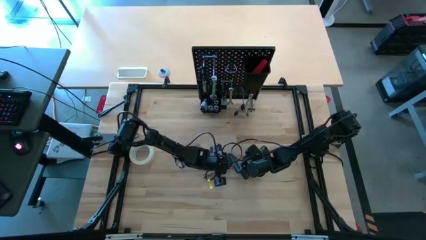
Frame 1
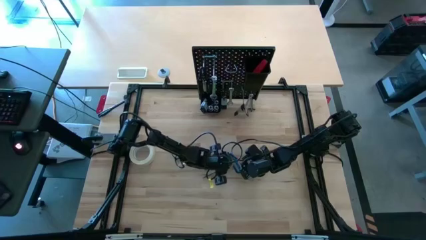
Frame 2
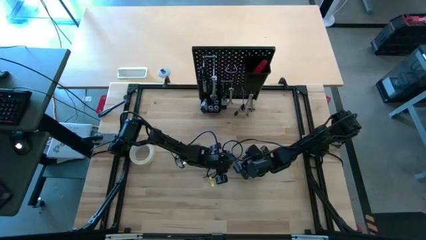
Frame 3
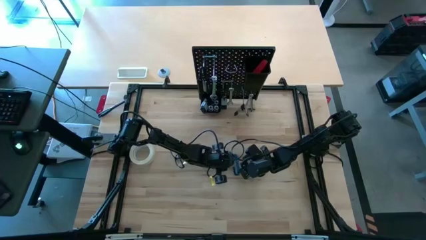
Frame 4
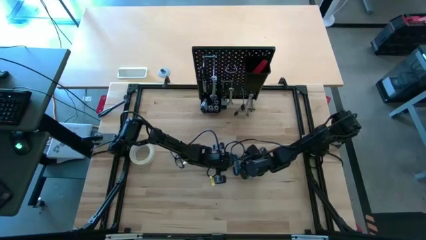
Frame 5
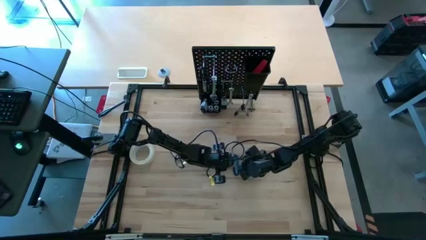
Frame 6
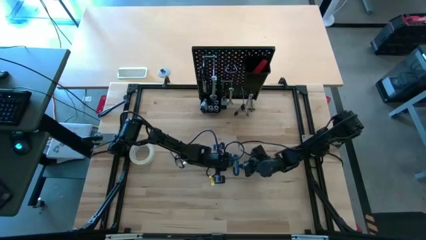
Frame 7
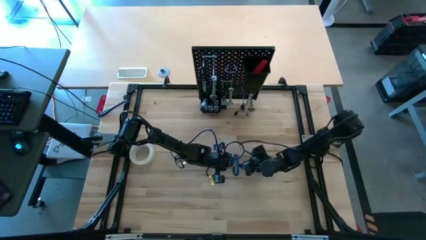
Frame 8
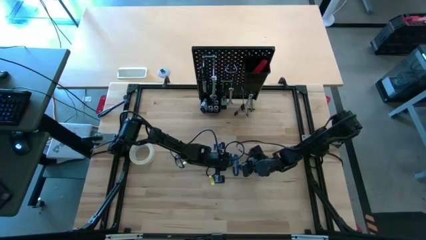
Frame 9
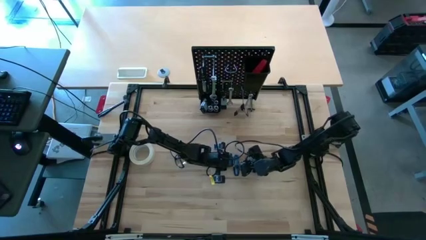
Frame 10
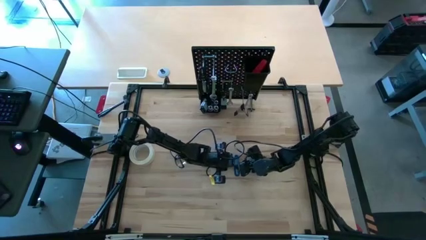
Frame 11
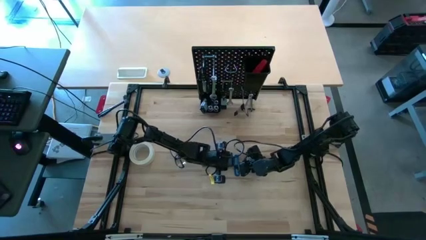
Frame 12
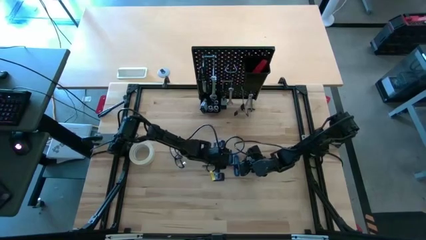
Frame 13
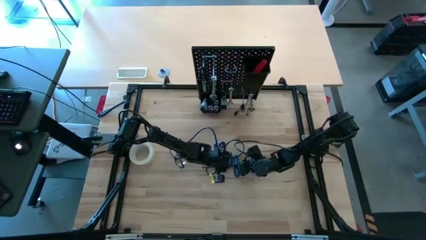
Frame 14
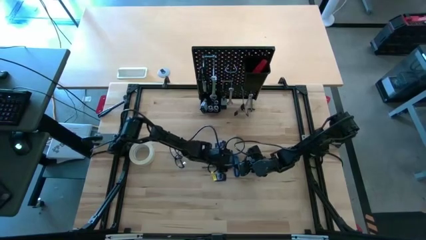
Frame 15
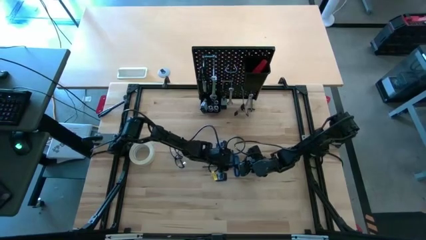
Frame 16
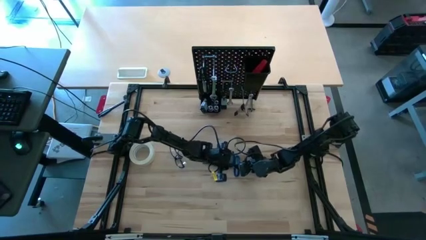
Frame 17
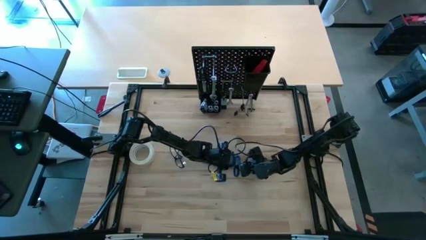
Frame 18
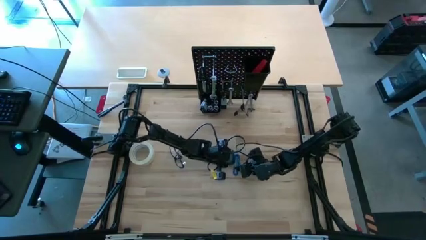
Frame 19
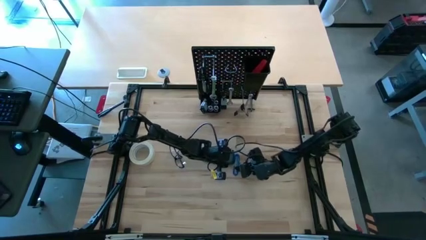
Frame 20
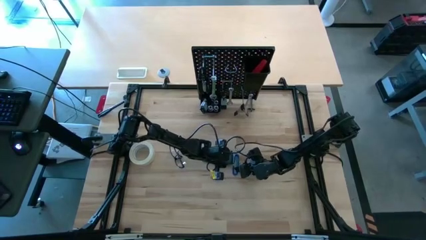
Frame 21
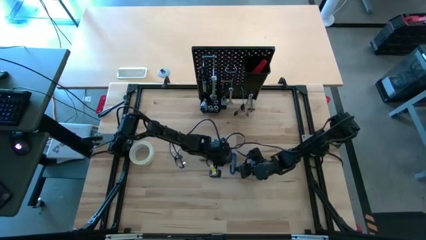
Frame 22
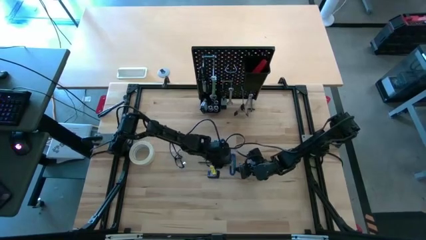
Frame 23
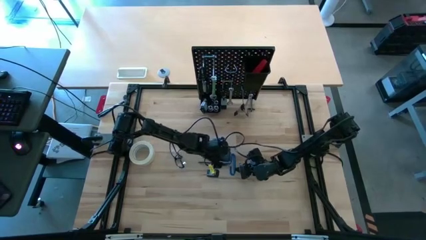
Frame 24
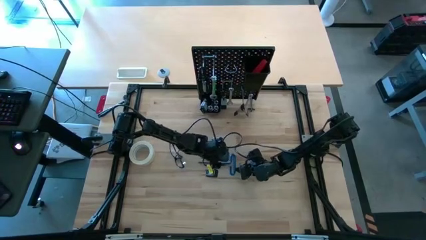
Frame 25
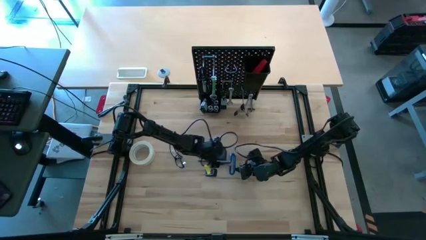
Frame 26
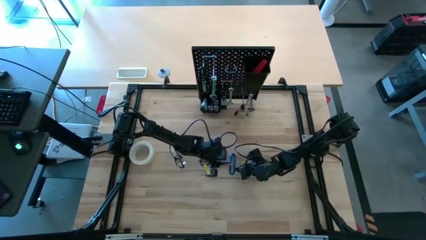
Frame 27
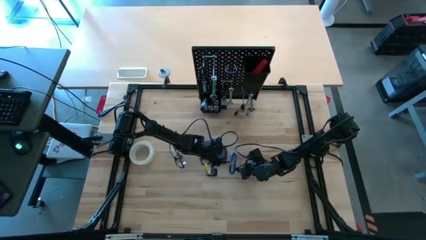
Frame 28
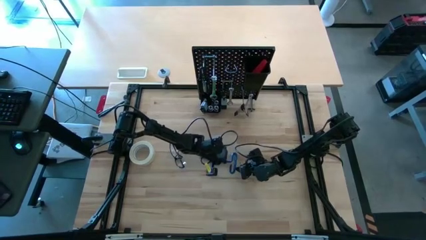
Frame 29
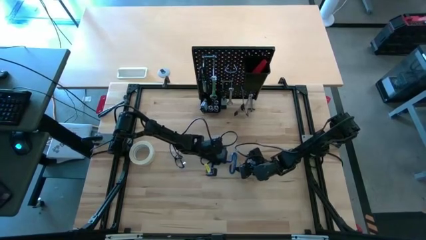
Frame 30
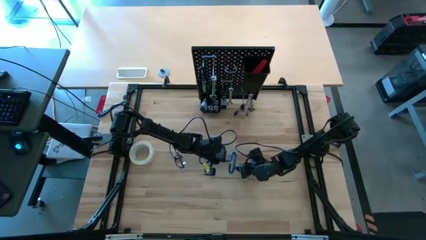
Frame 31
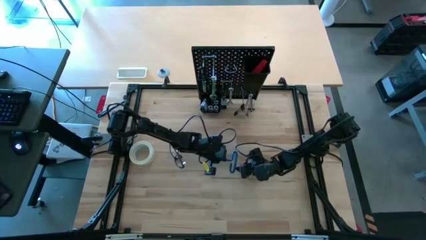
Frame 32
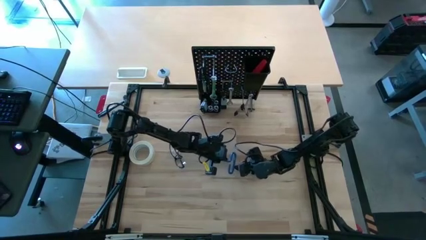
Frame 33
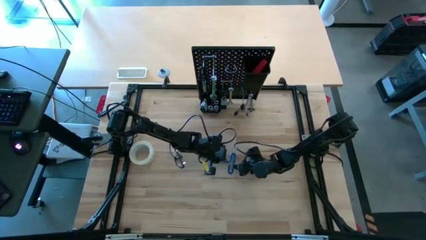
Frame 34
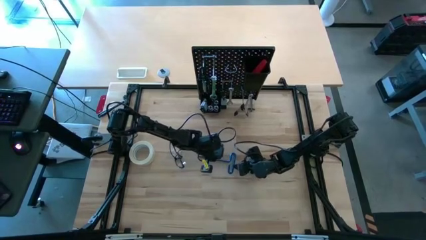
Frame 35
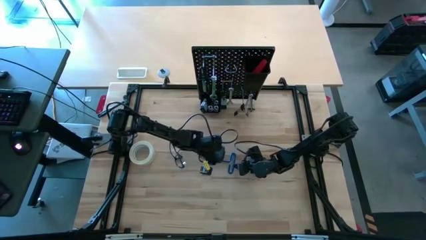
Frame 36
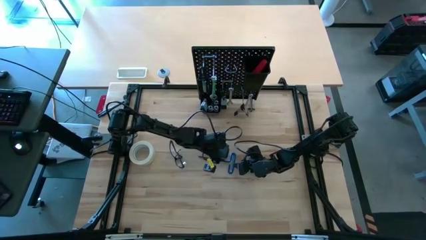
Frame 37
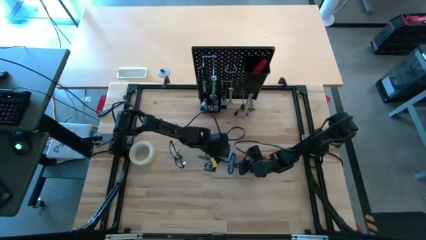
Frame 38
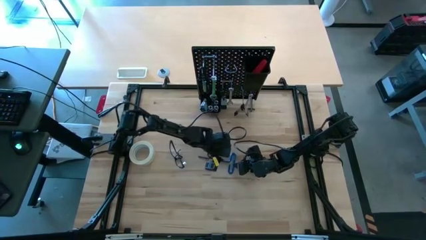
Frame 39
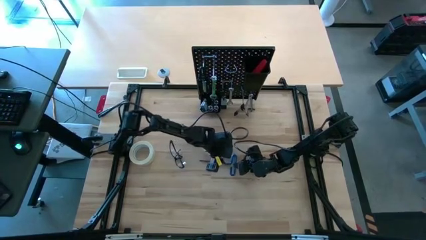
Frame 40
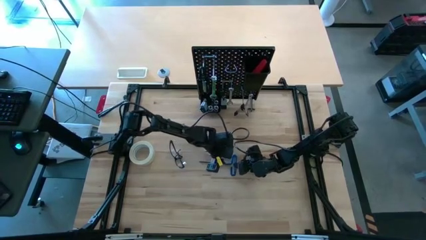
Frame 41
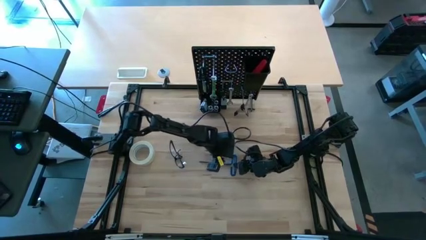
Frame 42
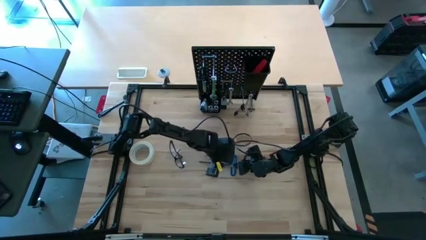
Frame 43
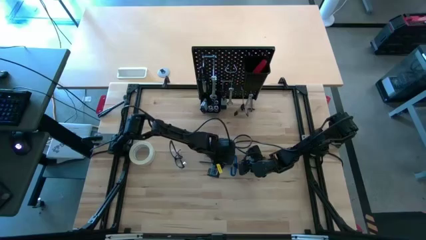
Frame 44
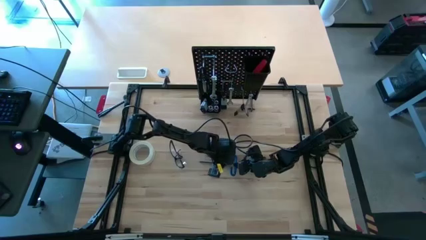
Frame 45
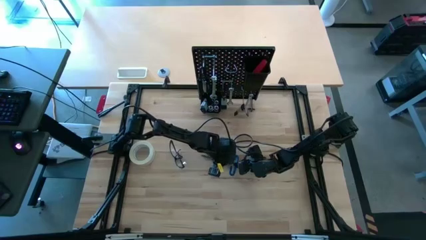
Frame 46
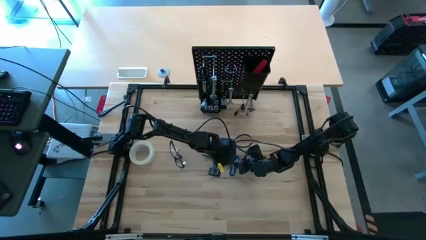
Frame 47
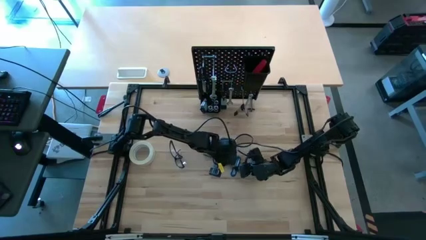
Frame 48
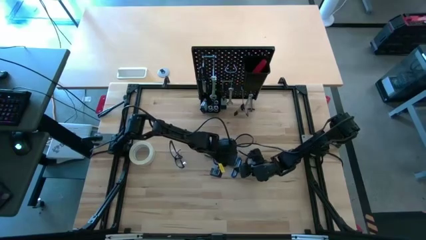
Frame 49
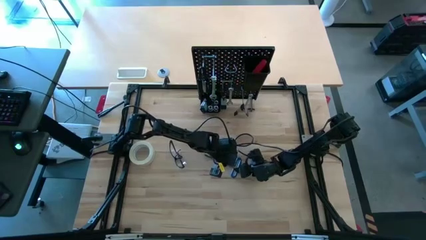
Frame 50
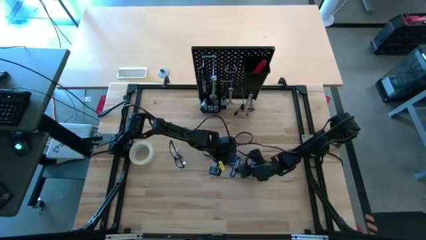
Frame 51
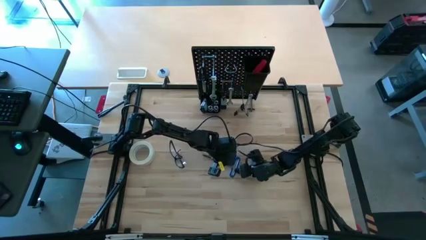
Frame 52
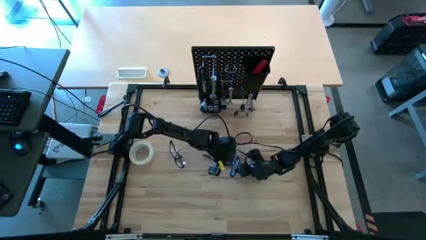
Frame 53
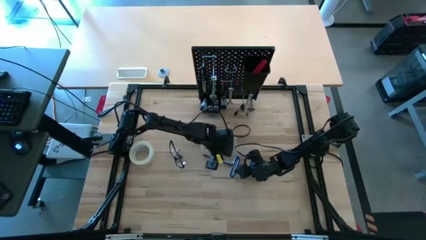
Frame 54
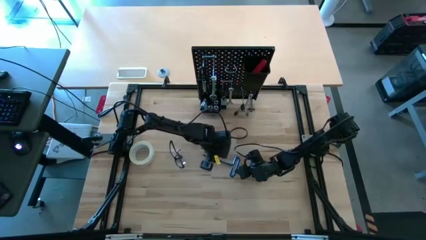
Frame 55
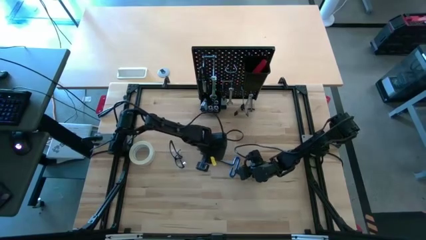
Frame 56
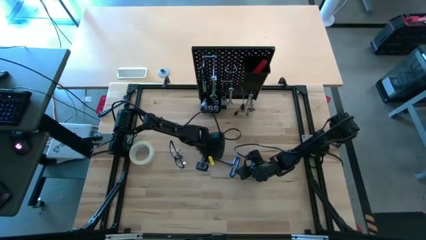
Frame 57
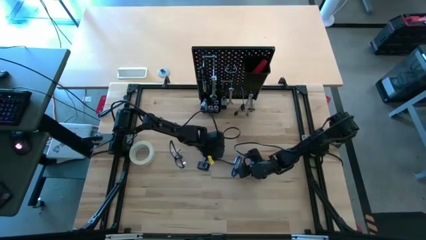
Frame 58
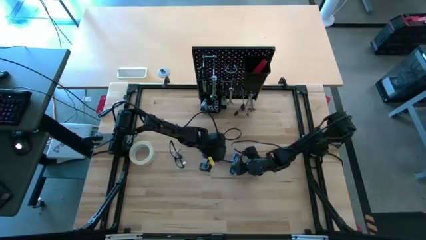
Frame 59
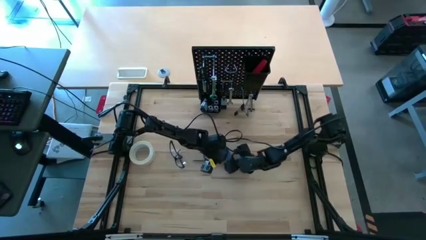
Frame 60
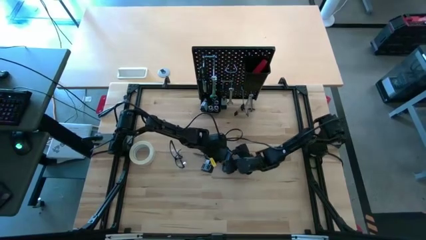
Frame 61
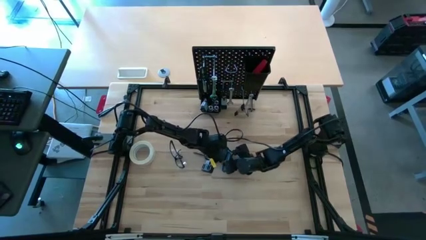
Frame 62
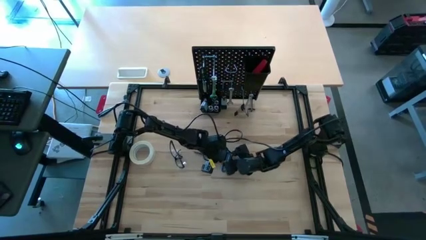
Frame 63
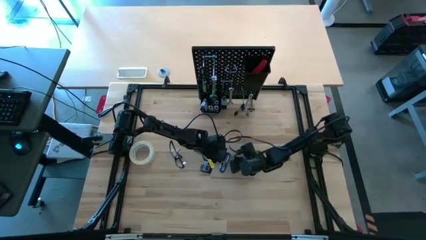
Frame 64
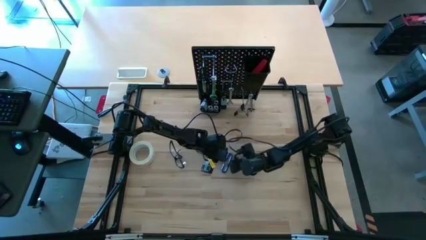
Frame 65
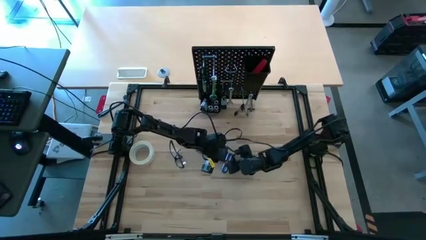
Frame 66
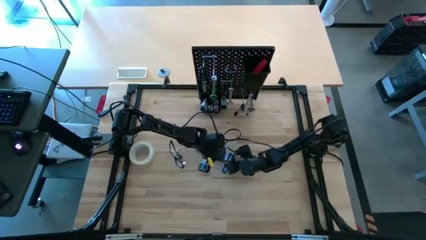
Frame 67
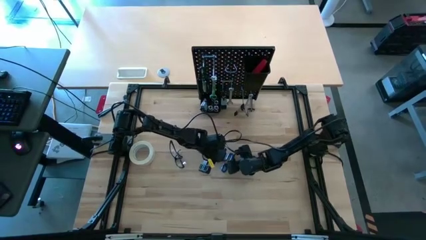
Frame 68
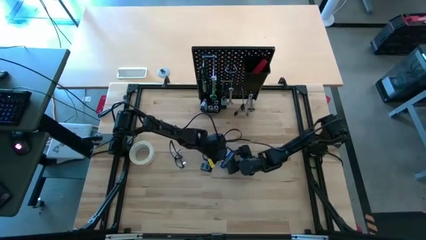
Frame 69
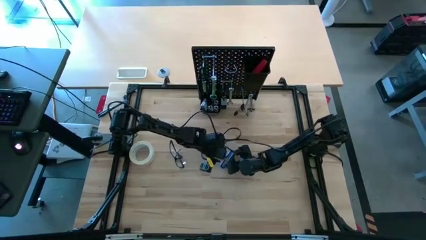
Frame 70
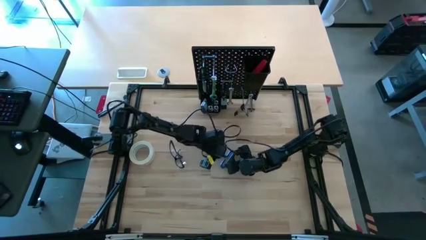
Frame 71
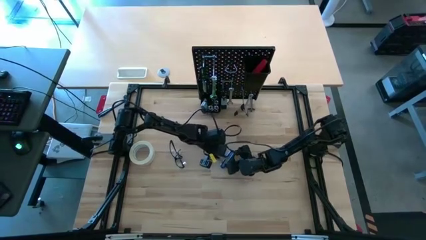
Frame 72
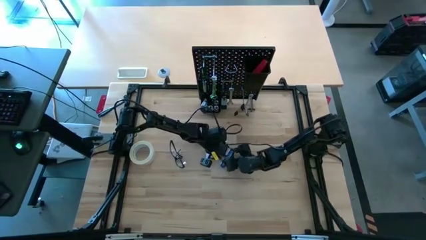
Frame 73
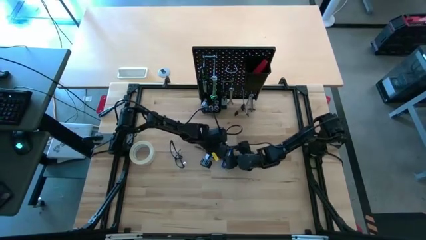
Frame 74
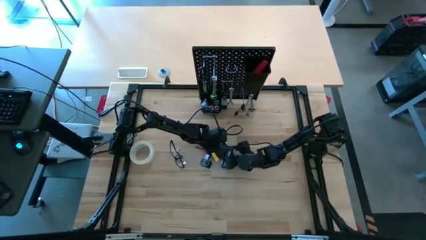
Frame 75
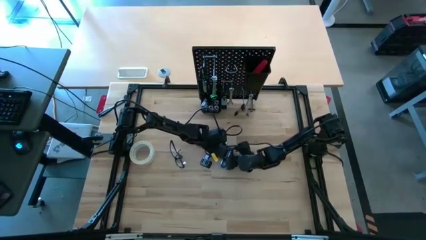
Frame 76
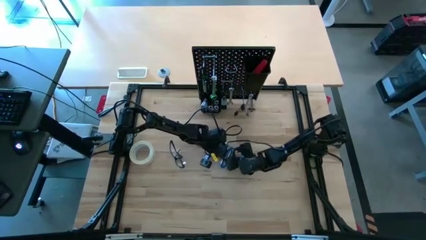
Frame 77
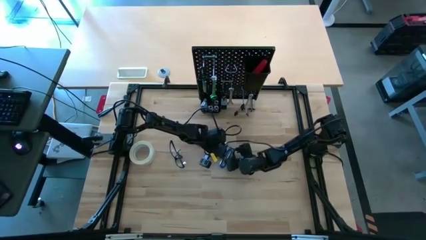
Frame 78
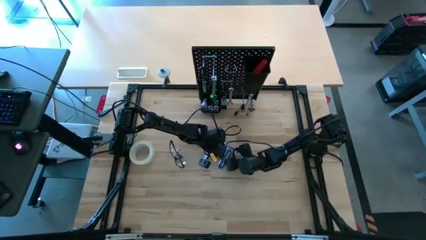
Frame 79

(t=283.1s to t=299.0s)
Task: Hang tools onto peg board
Put the pick tool into the black bin on the peg board
